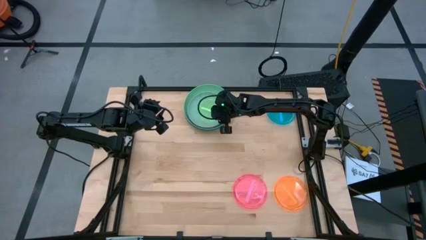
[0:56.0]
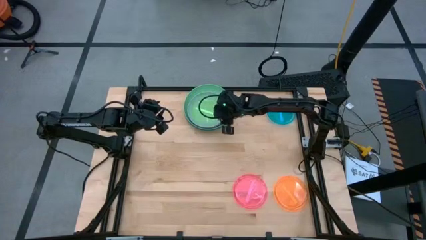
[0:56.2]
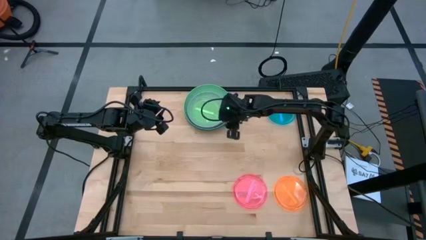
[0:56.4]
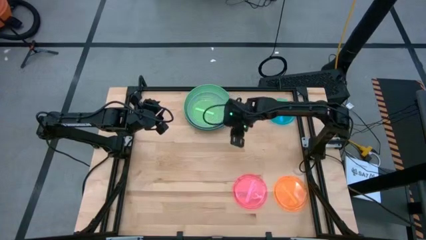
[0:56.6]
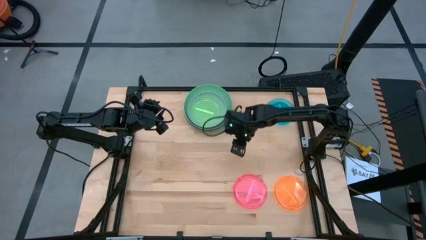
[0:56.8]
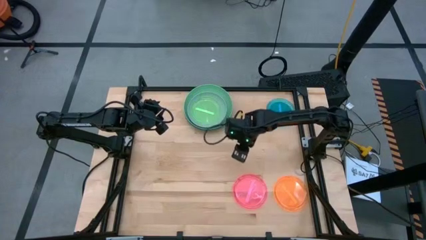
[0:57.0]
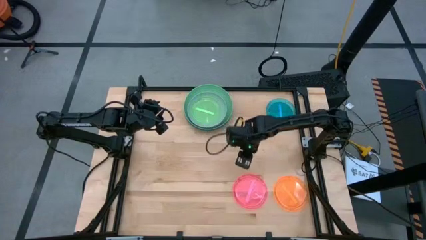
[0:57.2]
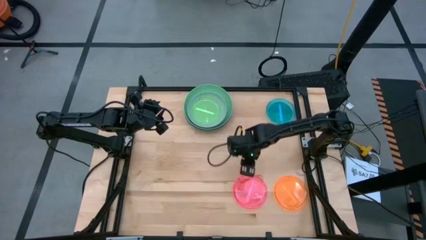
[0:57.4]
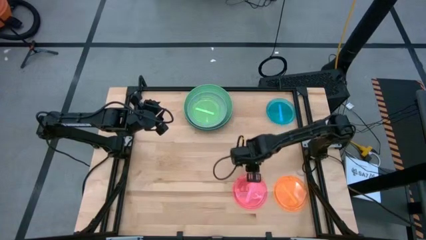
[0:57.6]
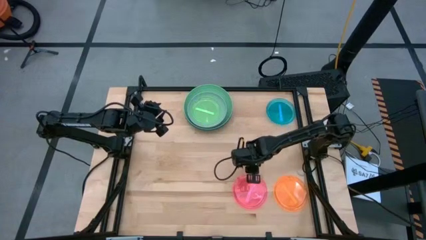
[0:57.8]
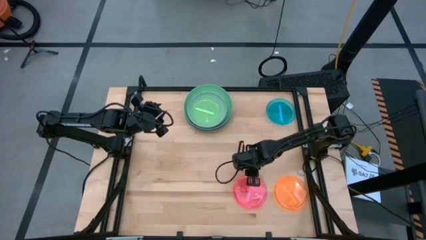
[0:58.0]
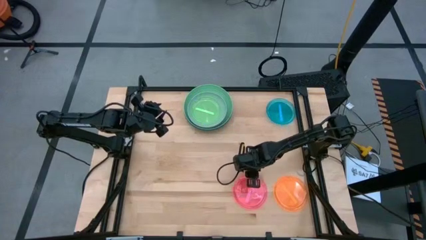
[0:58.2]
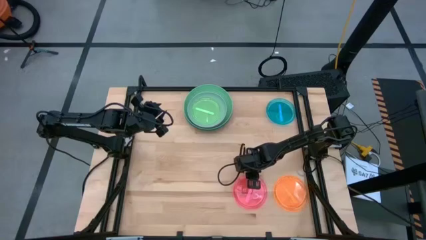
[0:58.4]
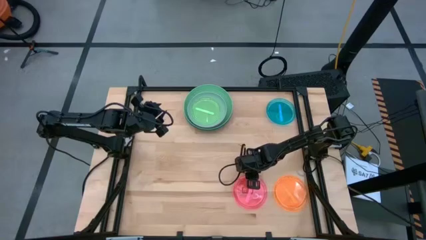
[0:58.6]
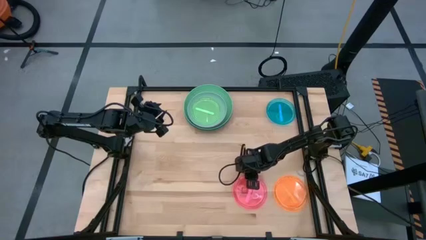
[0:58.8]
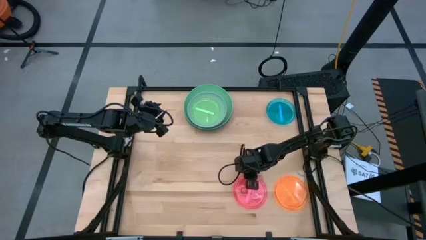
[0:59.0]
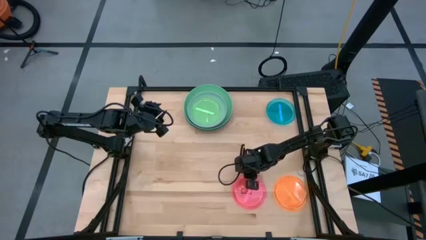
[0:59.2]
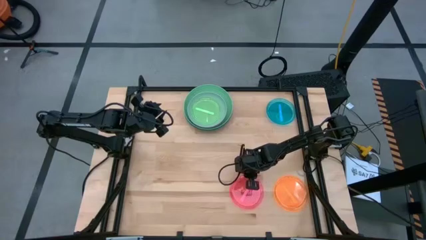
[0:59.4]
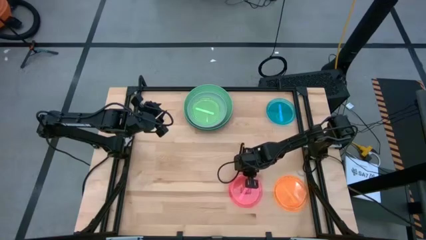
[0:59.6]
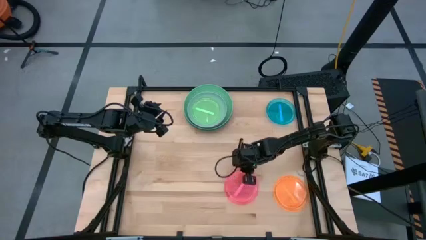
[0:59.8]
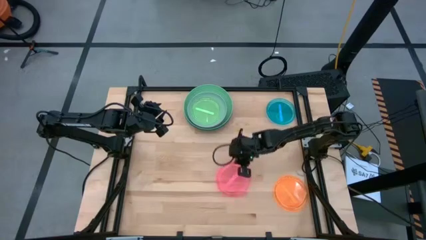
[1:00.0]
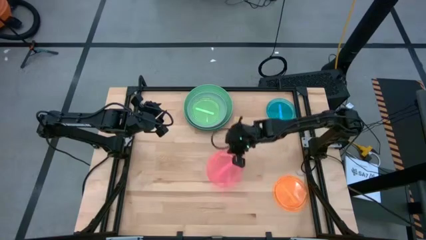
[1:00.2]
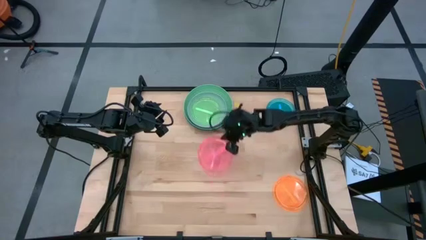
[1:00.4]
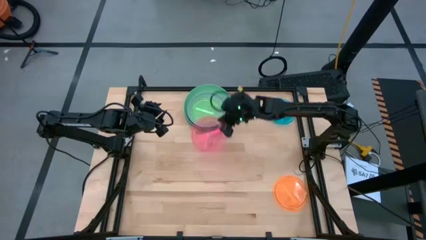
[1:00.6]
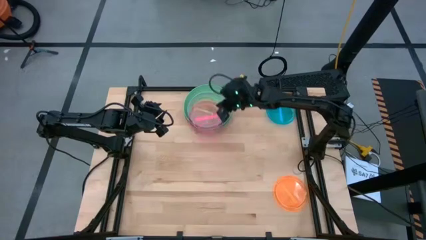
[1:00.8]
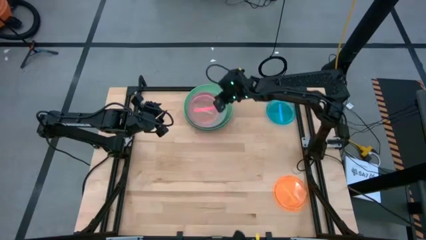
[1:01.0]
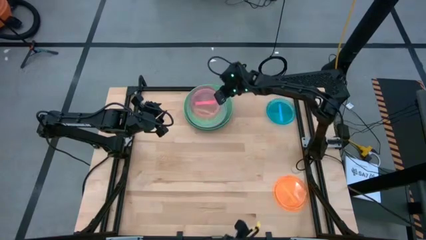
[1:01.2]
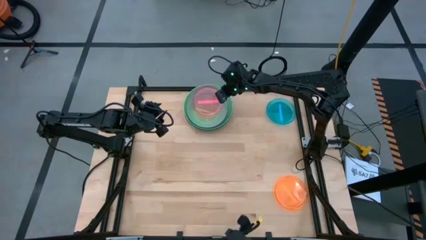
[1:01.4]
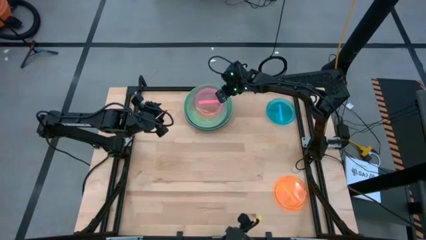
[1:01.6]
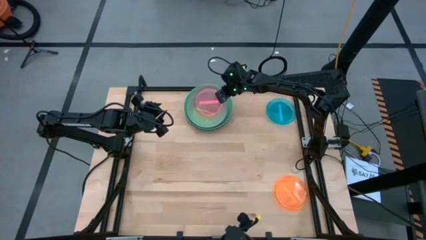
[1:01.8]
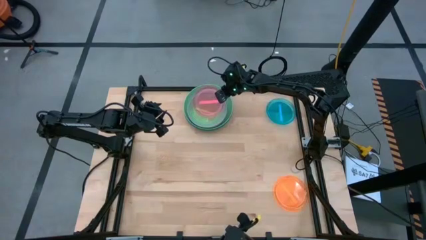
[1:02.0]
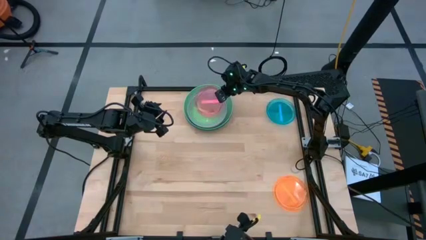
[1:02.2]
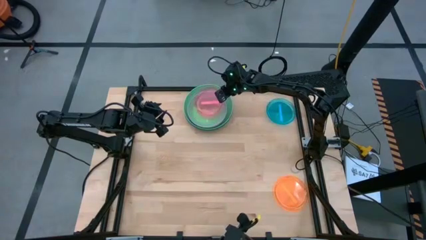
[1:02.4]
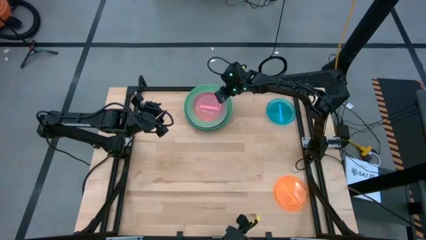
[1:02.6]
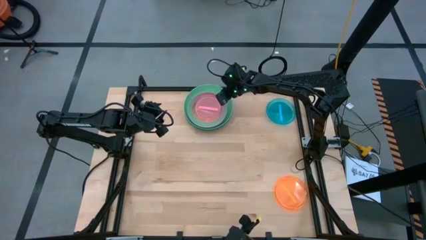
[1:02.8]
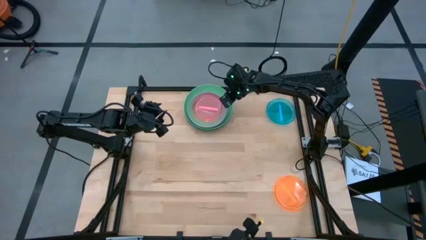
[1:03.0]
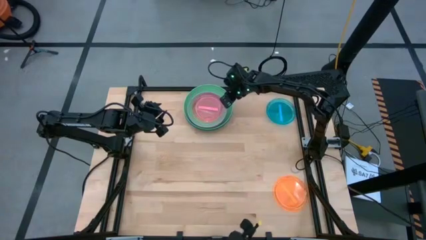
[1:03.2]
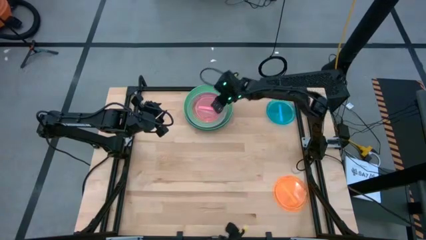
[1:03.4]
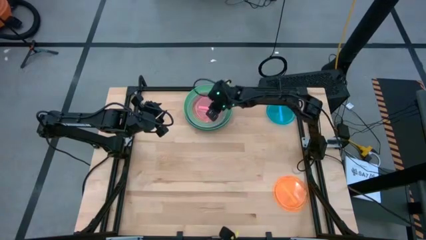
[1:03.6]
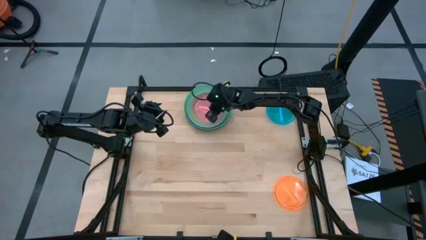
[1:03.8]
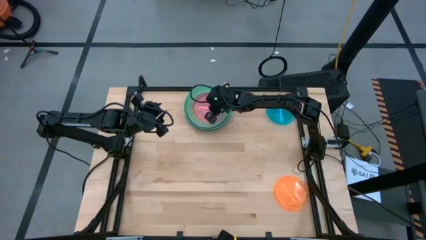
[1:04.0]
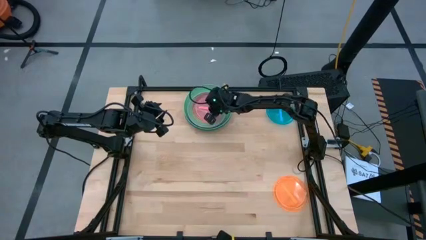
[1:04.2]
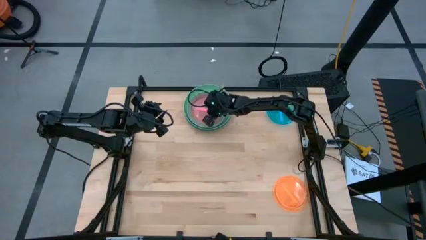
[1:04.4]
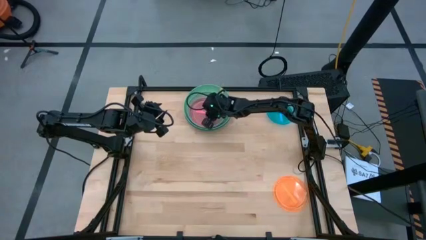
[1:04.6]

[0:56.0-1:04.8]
Task: Stack plastic plates
Stack the pink plate on top of the light green plate

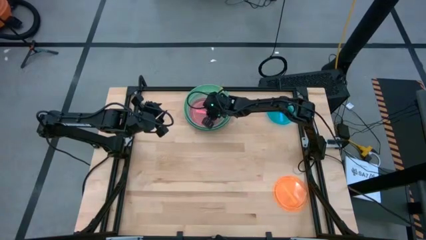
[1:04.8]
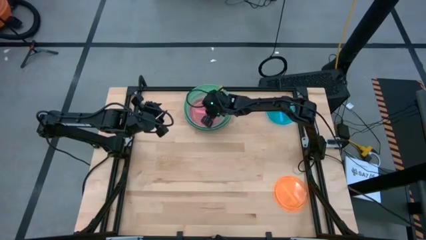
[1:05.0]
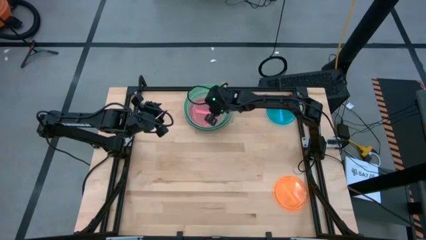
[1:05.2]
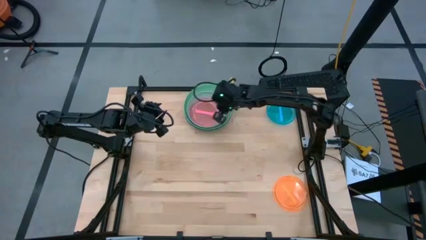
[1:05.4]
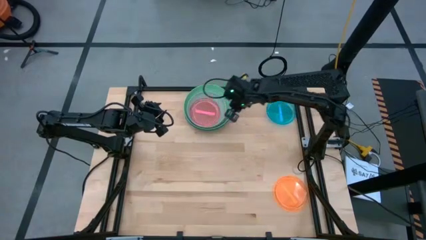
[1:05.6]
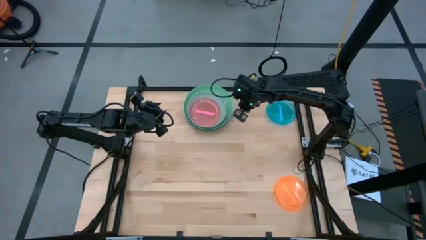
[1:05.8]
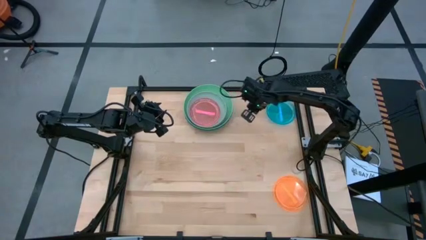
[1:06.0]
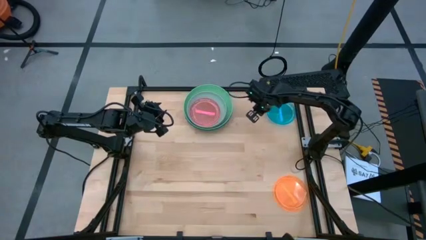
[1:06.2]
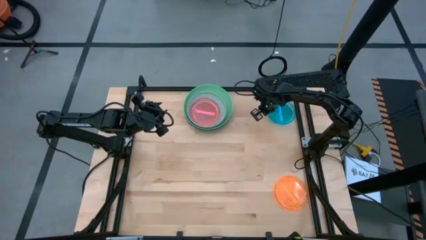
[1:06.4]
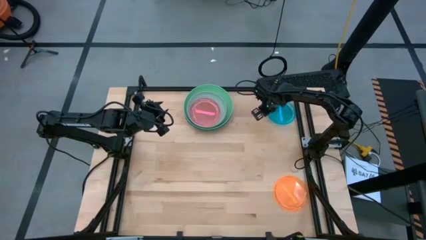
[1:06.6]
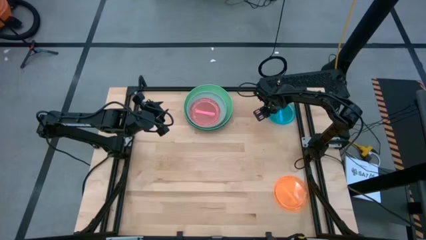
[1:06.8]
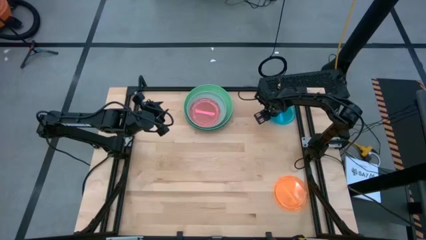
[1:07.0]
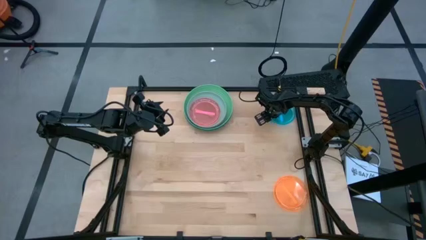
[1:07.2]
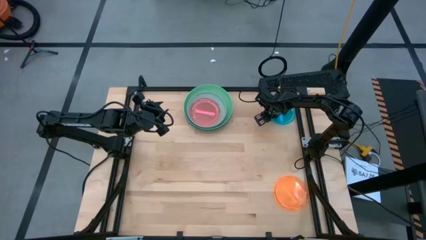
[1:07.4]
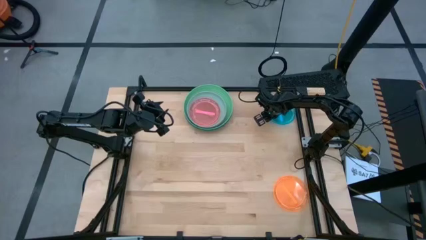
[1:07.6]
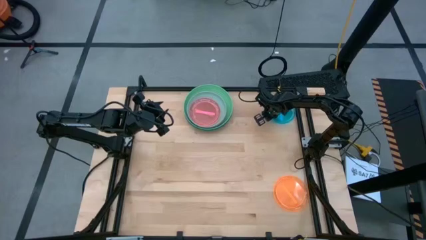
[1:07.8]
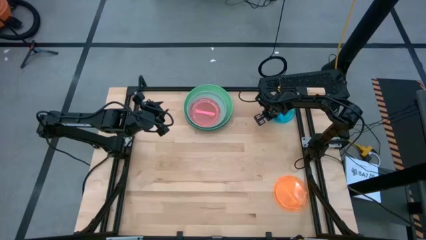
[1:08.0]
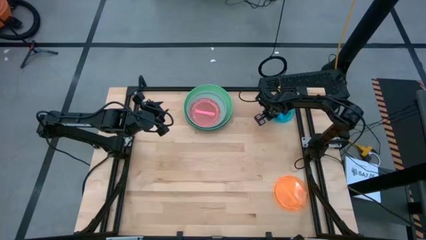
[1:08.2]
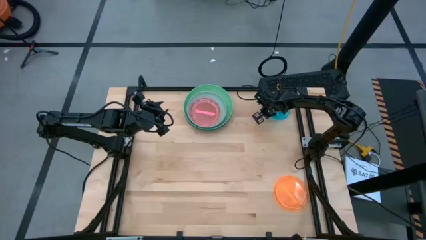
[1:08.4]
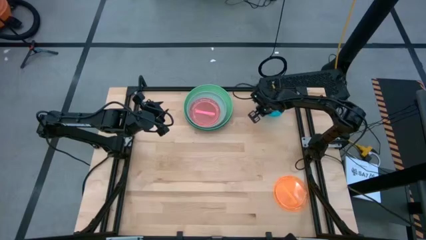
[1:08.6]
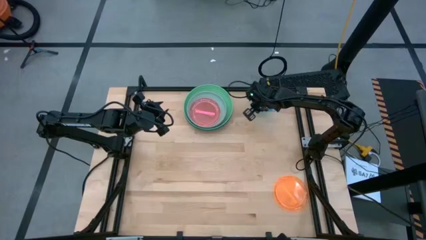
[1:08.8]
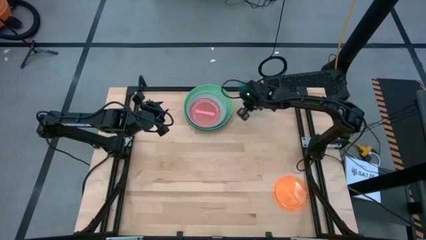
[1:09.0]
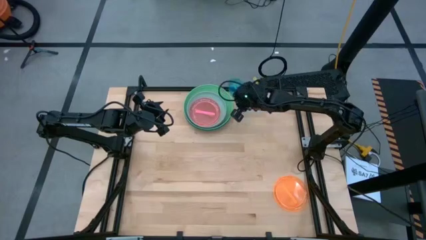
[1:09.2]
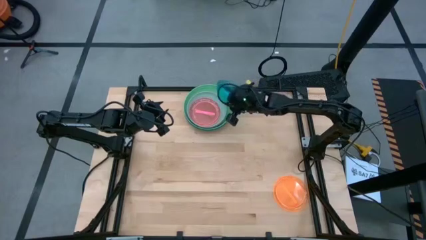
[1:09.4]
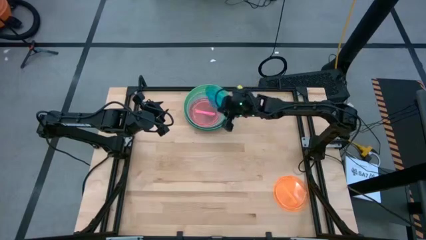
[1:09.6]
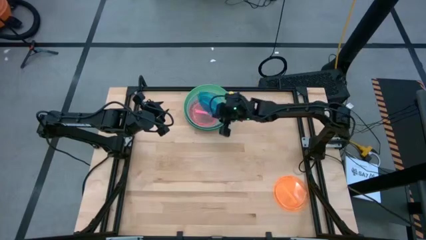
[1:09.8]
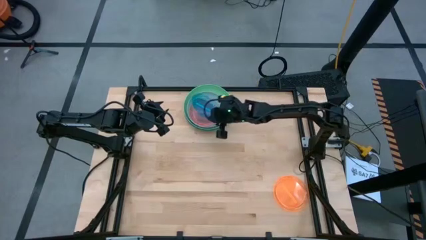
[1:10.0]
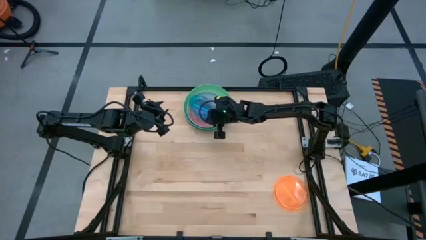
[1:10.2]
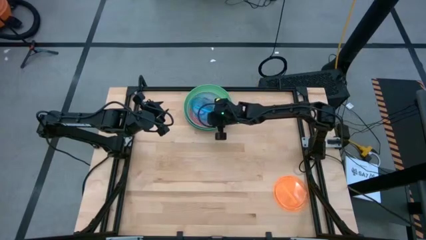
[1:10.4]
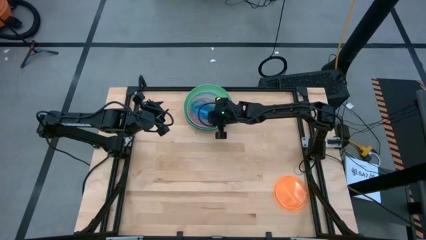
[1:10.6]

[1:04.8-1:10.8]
Stack the blue plate on top of the pink plate
